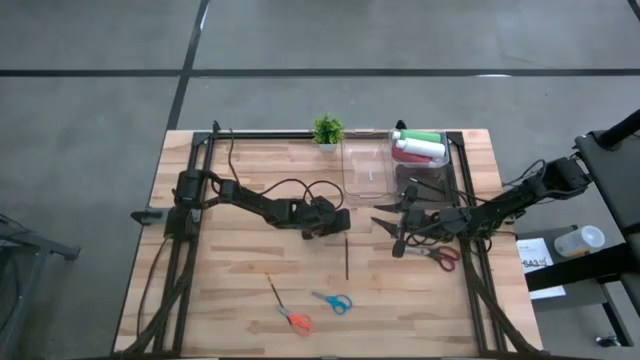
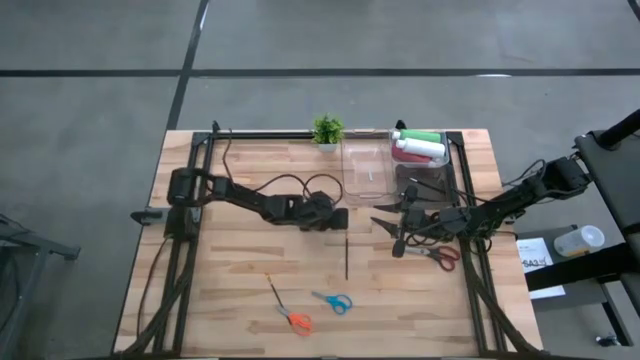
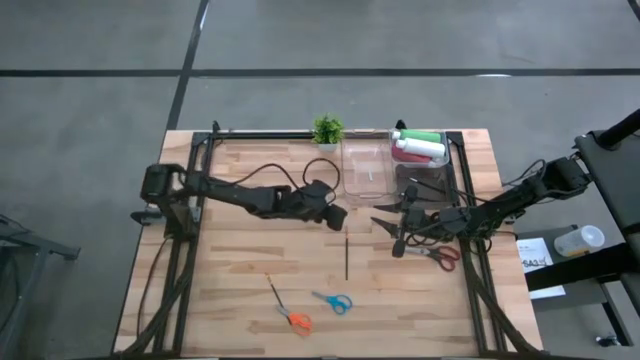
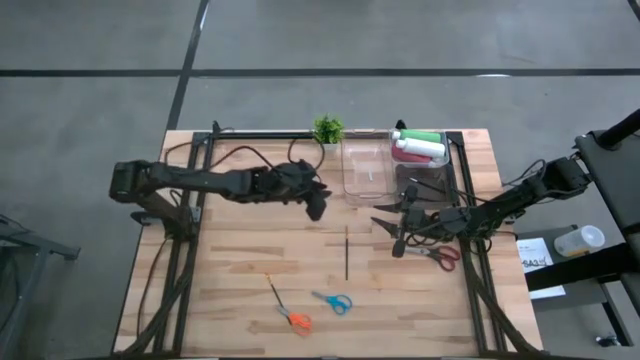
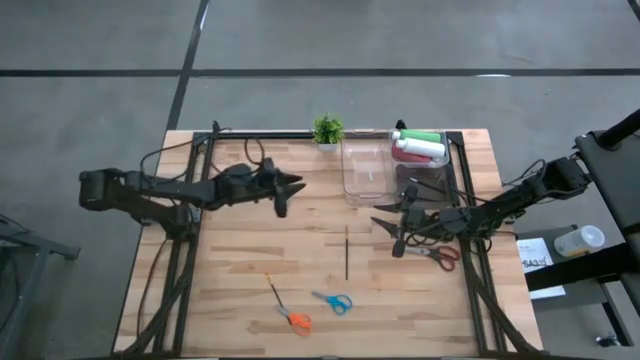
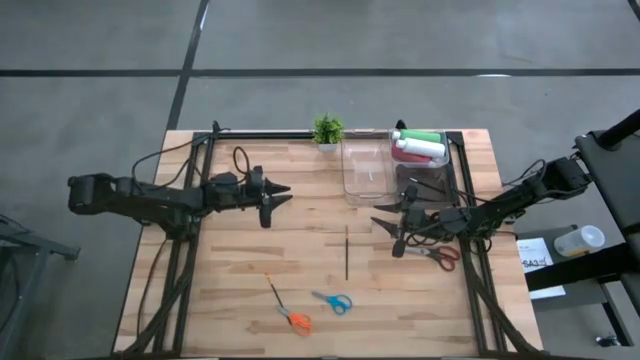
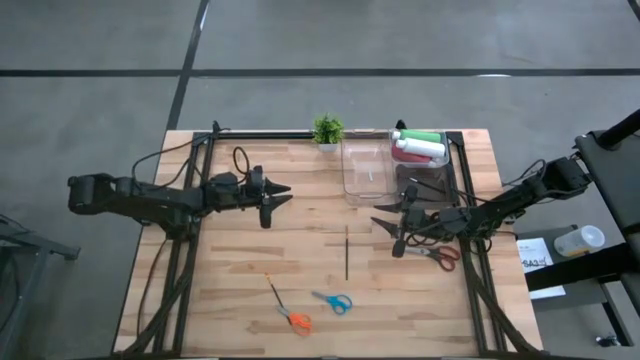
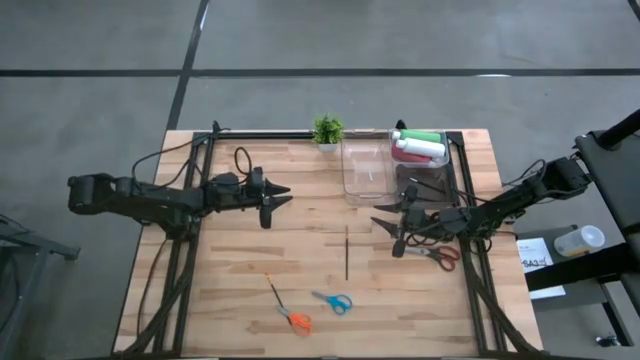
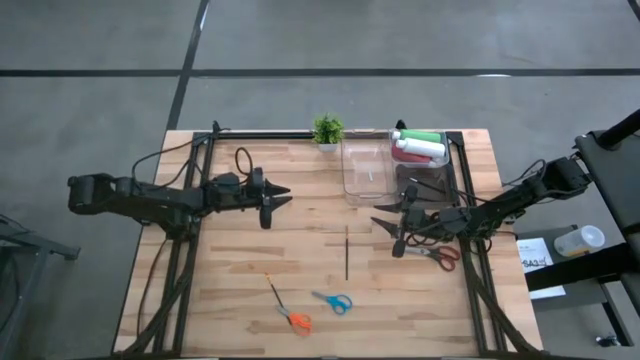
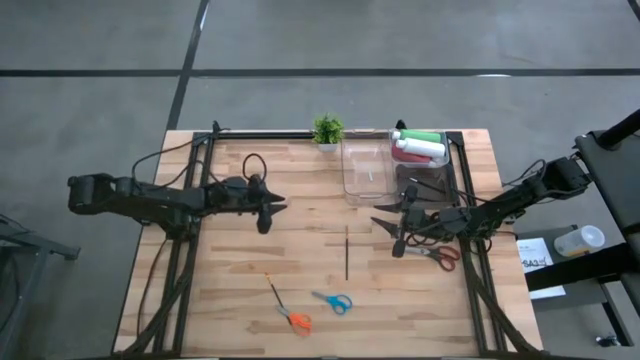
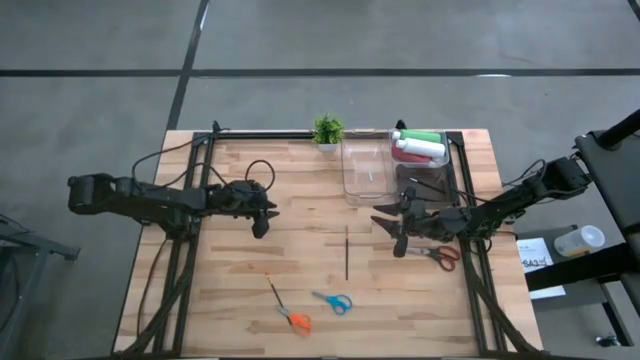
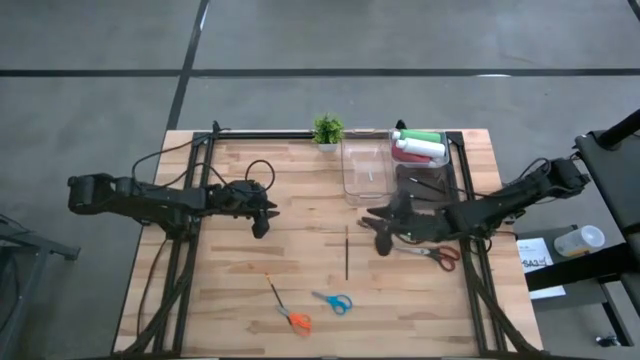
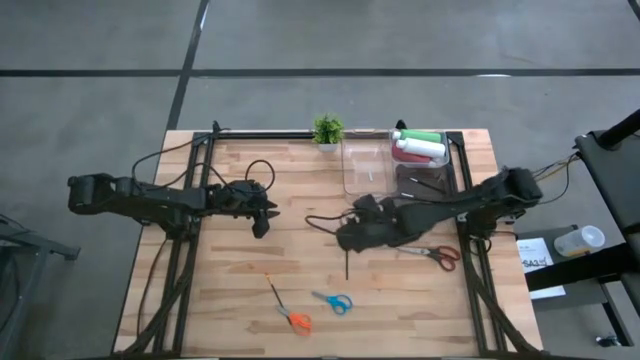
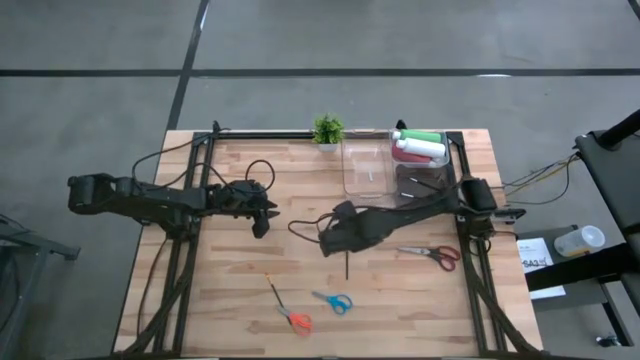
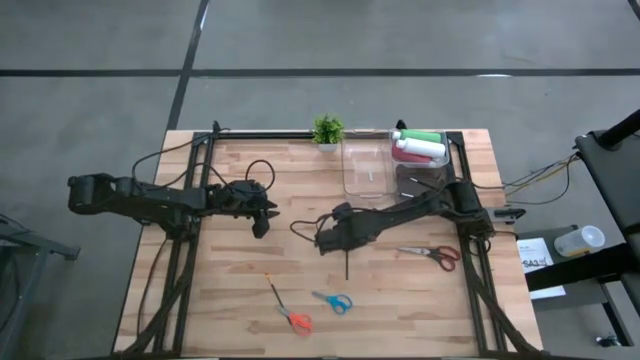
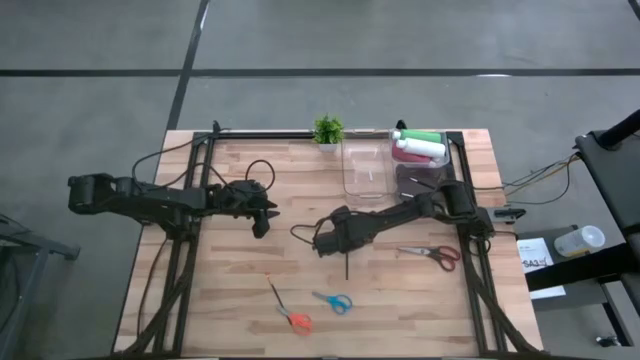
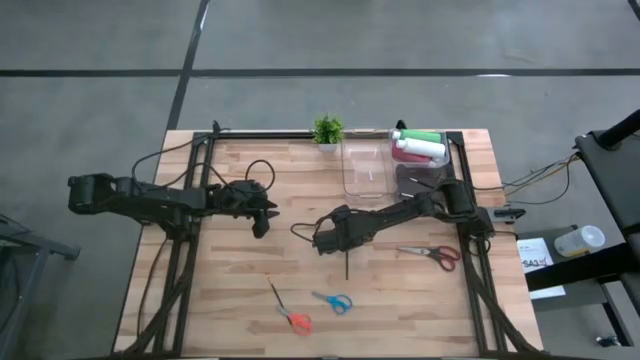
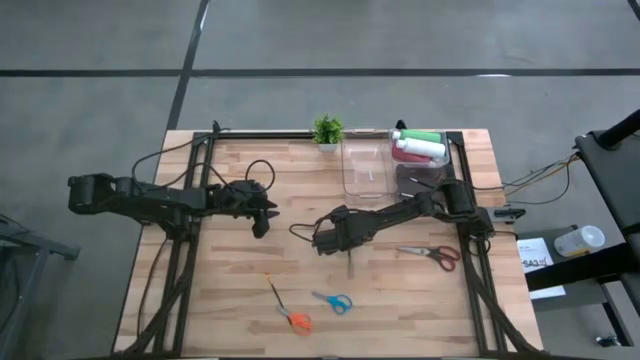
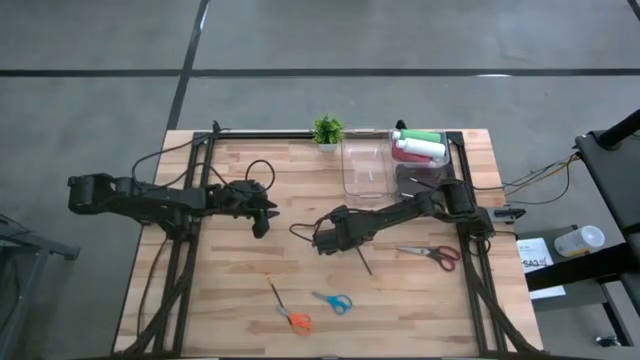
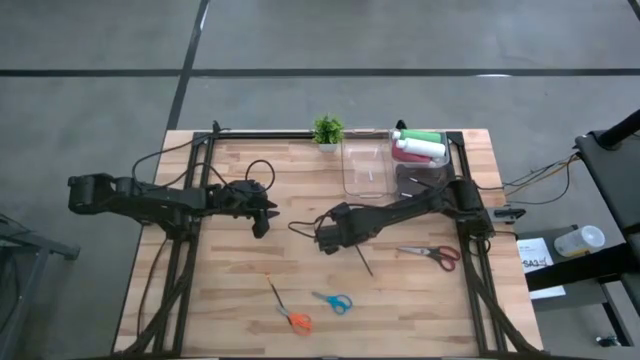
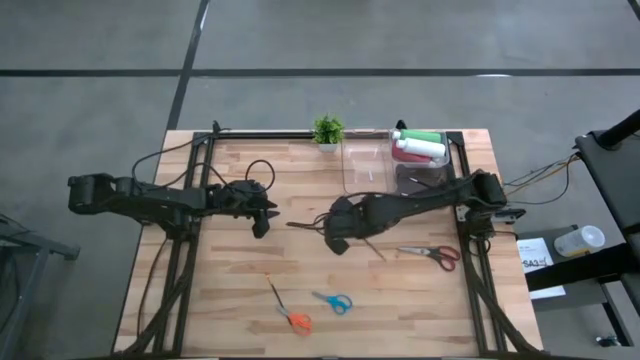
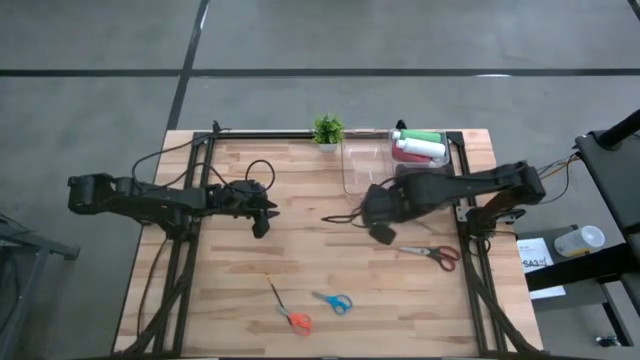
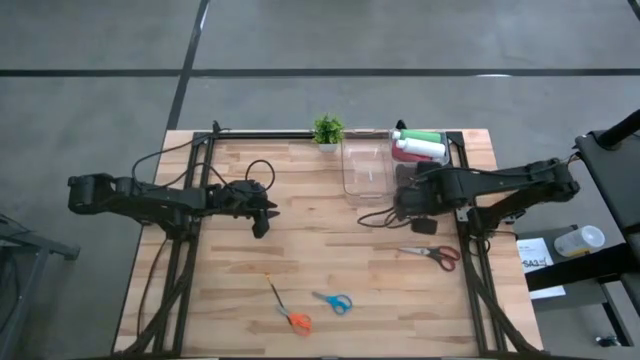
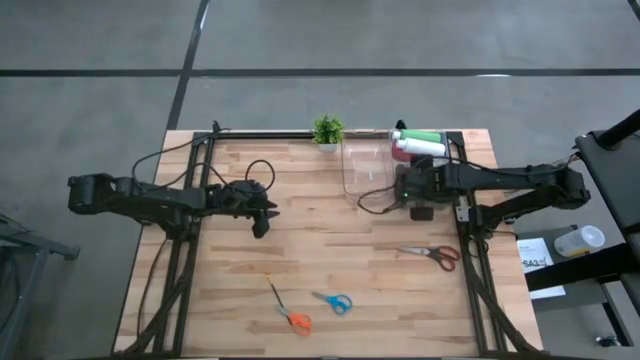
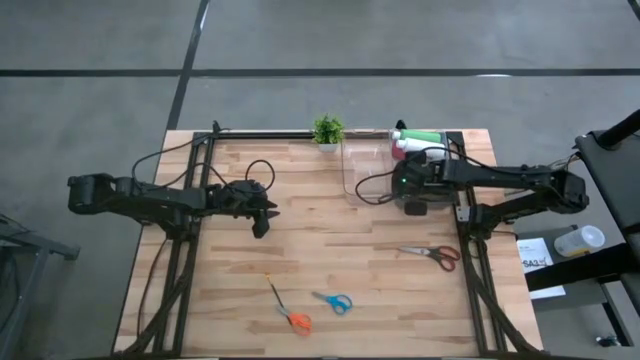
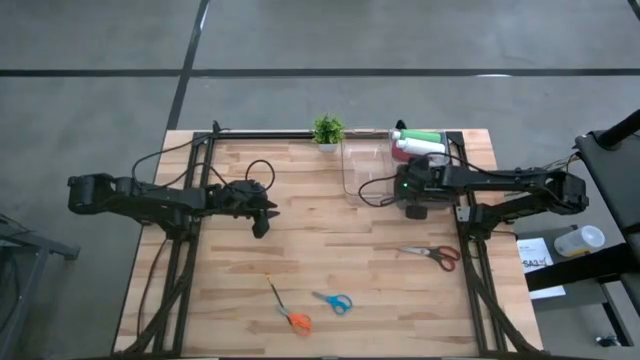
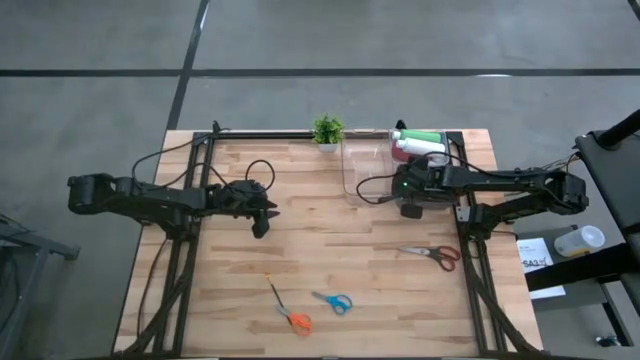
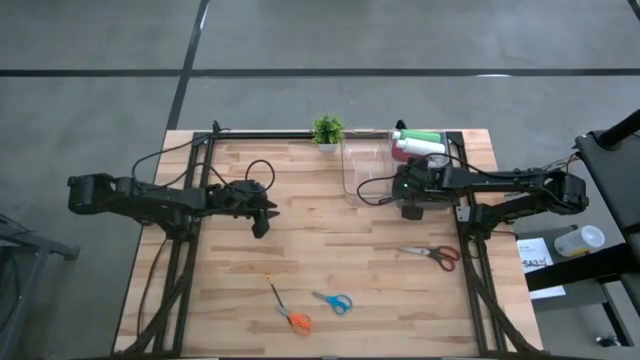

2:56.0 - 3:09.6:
Task: Pick & Place Paint Supplies
Put the left gold paintbrush into the black bin

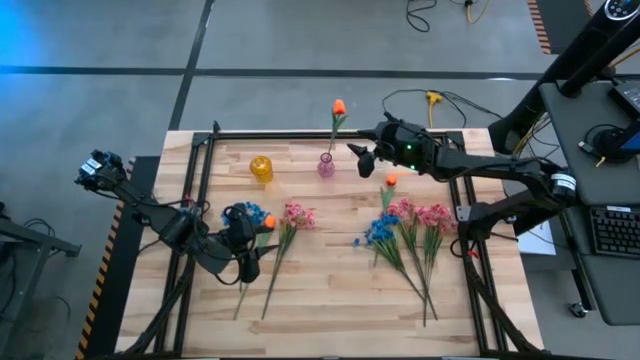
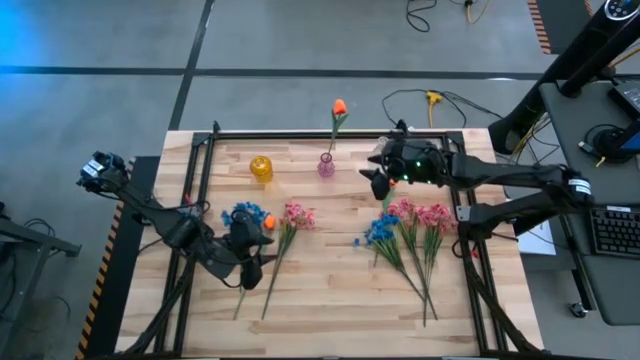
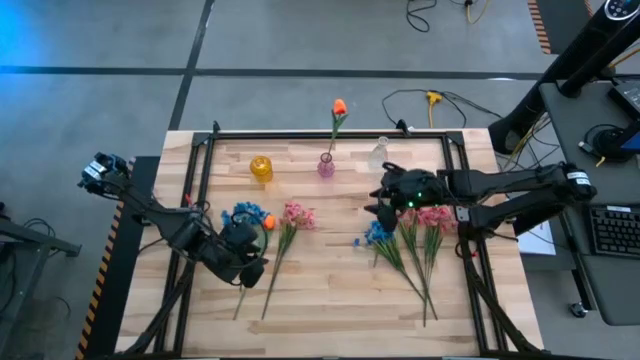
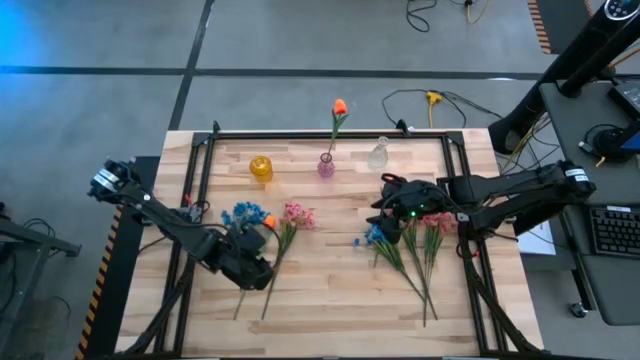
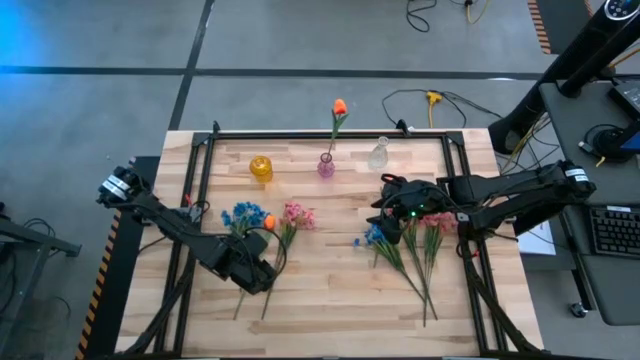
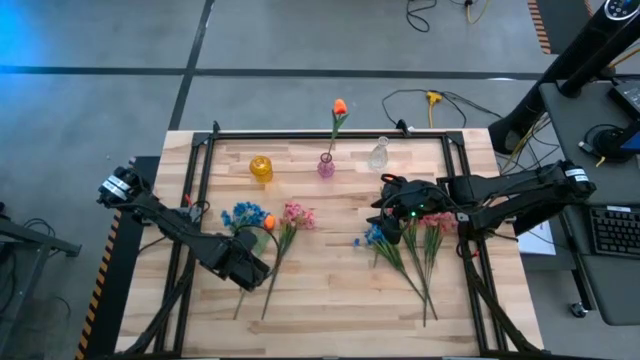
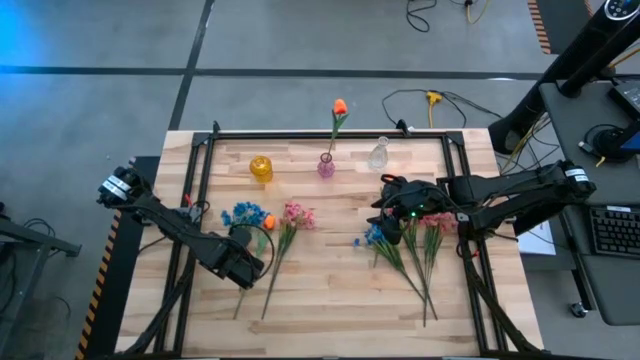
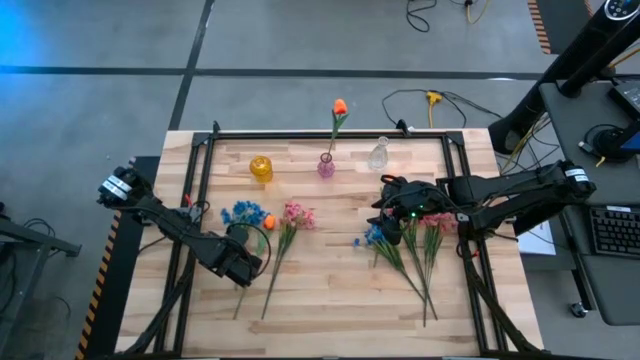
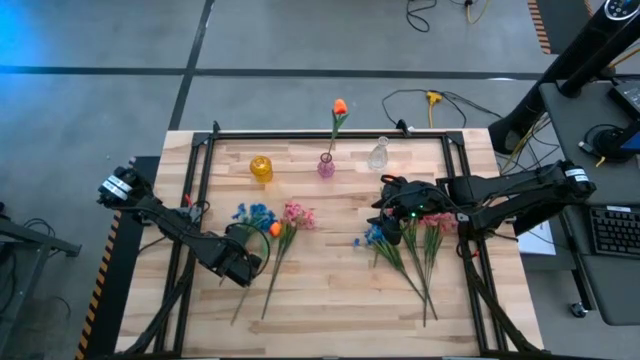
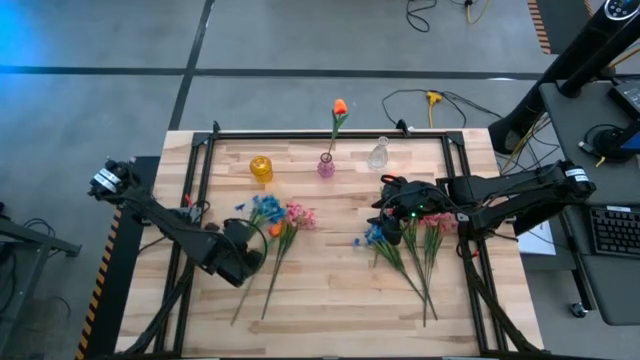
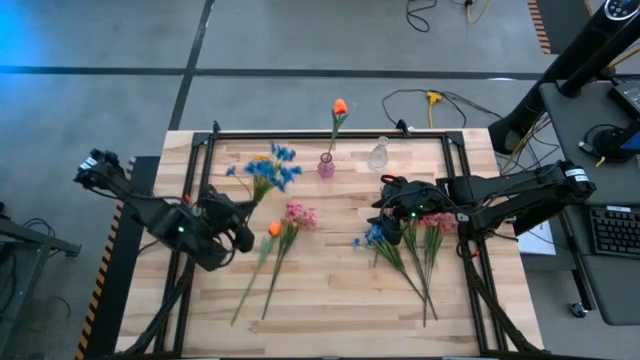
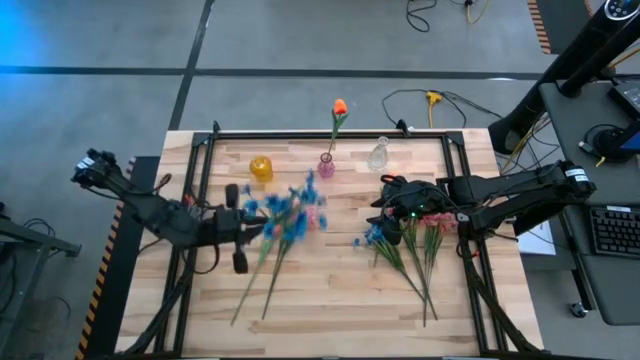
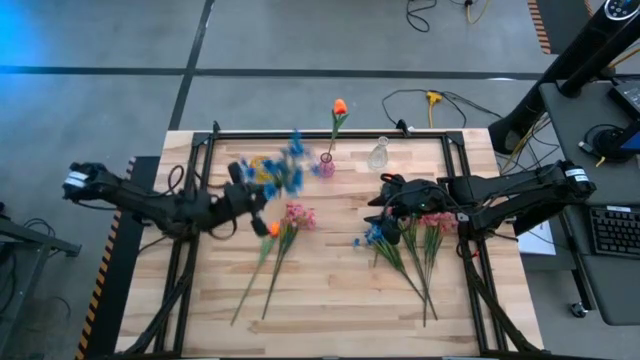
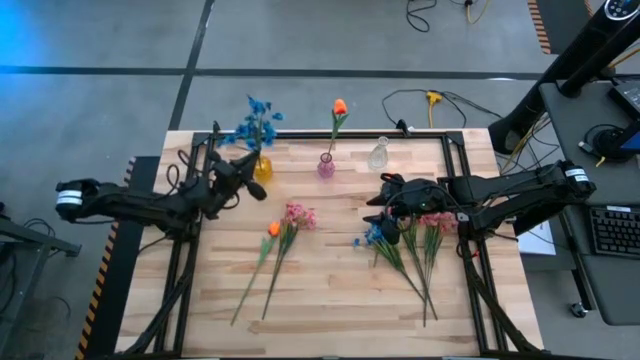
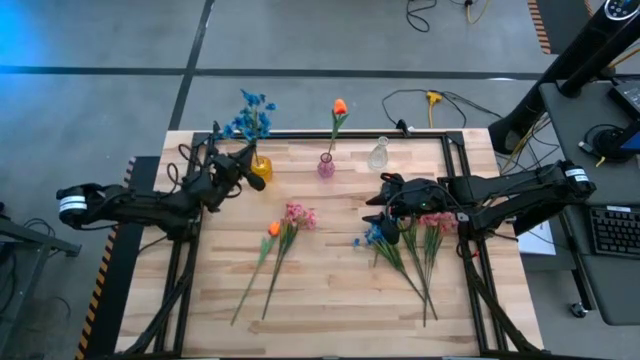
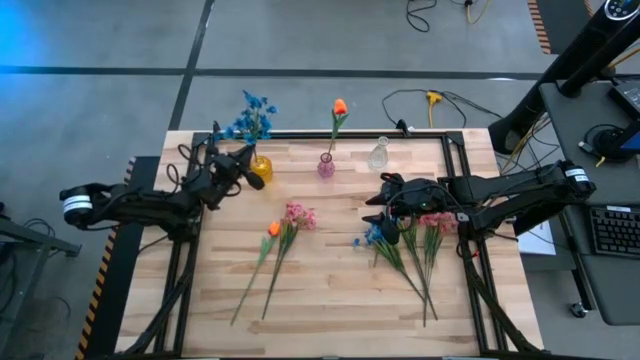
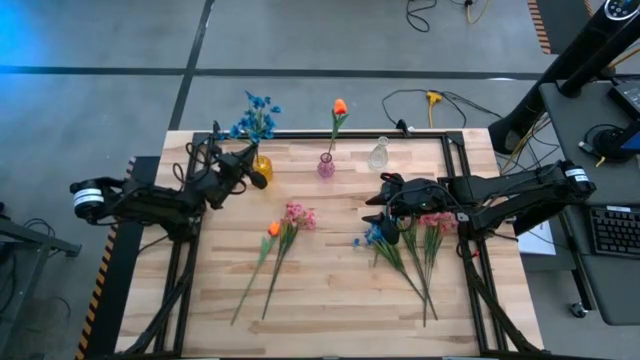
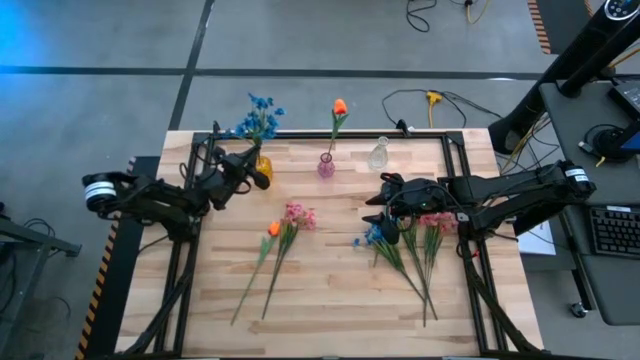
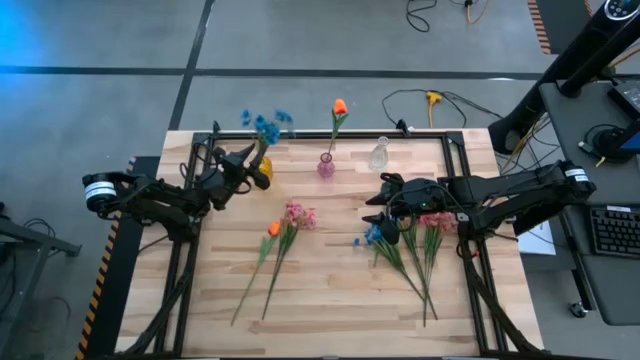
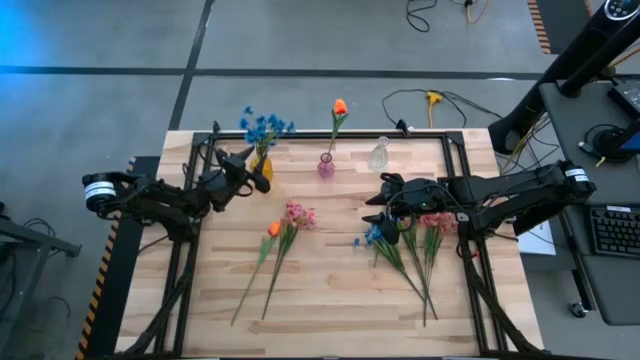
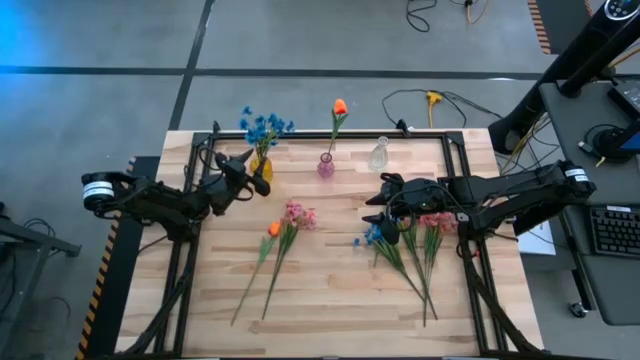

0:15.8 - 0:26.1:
Task: Sort flowers into vase by color
Put the left blue flowers into the yellow vase
